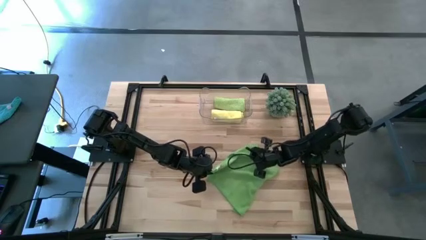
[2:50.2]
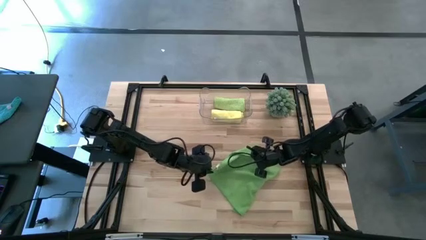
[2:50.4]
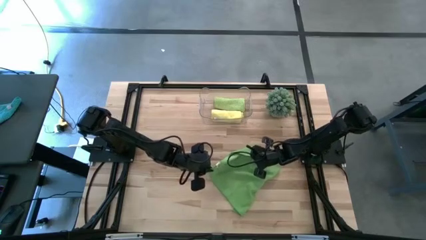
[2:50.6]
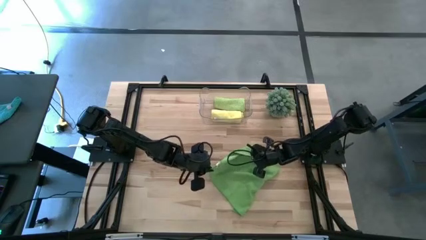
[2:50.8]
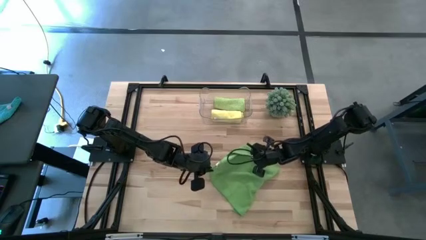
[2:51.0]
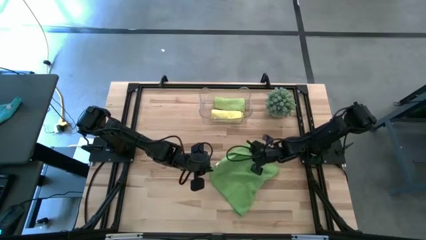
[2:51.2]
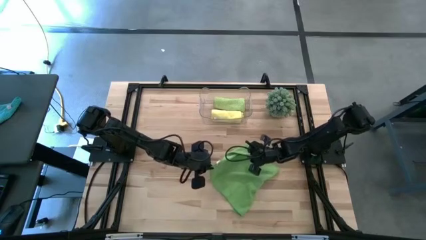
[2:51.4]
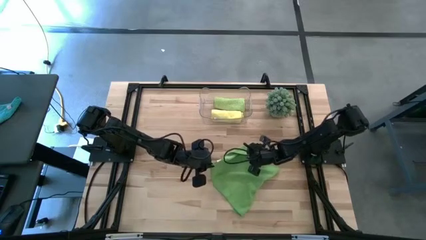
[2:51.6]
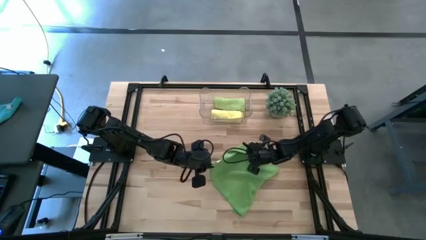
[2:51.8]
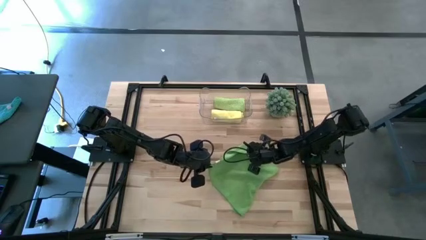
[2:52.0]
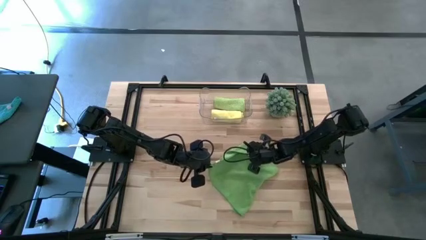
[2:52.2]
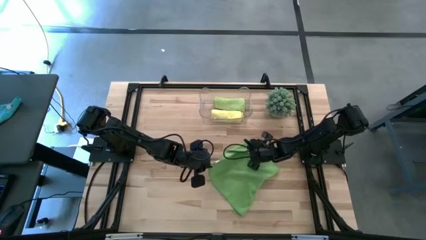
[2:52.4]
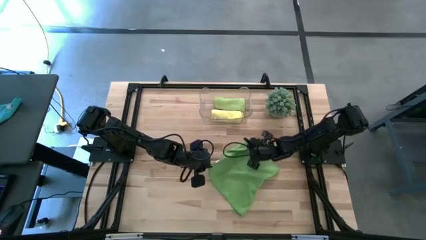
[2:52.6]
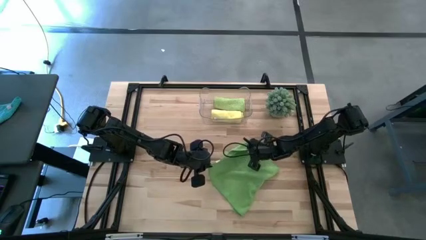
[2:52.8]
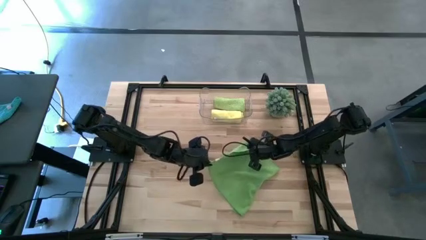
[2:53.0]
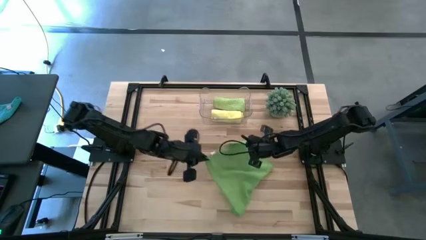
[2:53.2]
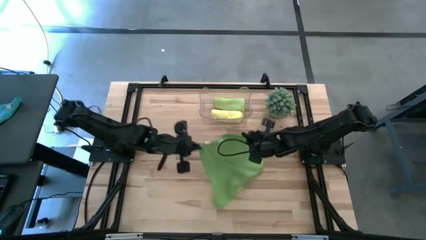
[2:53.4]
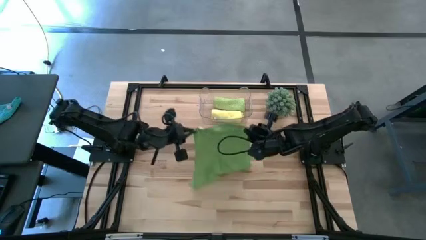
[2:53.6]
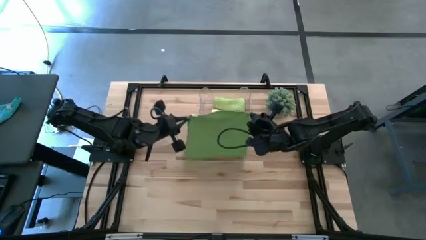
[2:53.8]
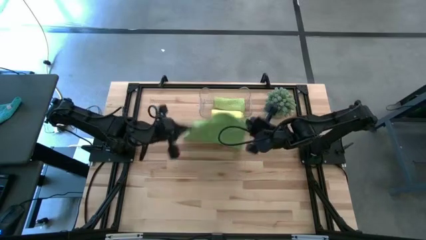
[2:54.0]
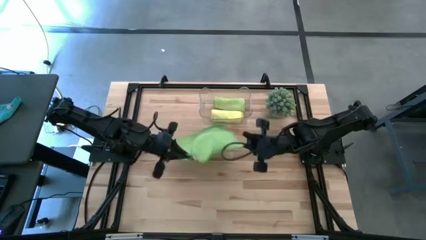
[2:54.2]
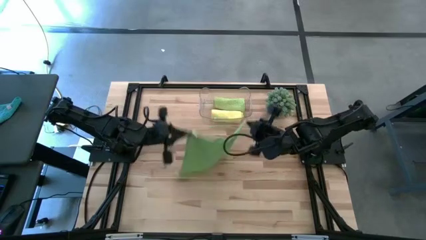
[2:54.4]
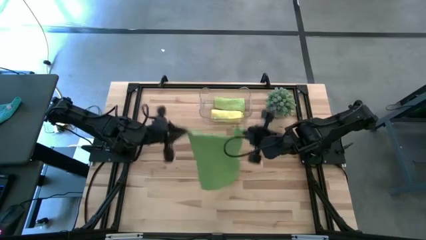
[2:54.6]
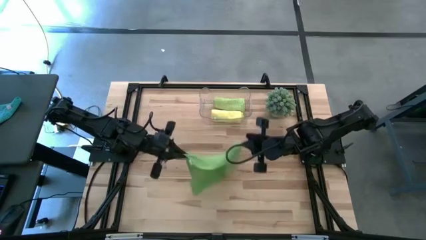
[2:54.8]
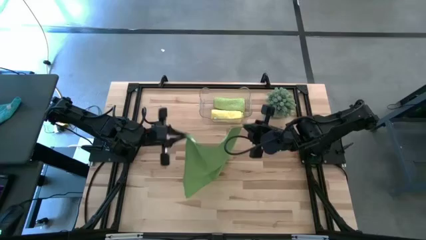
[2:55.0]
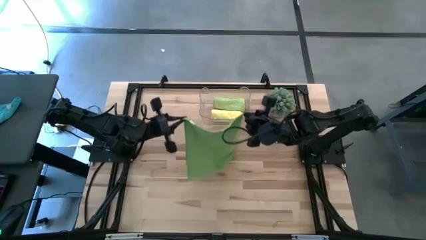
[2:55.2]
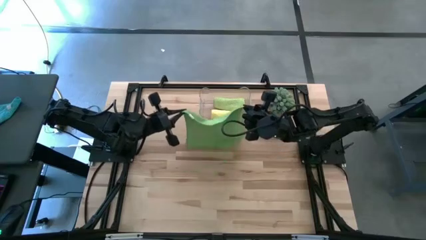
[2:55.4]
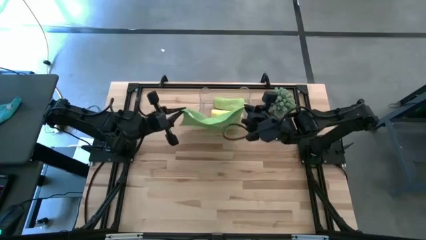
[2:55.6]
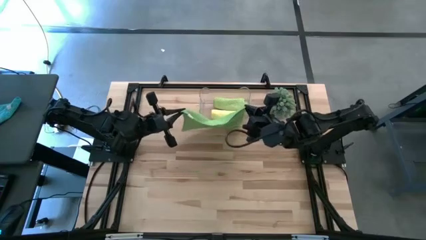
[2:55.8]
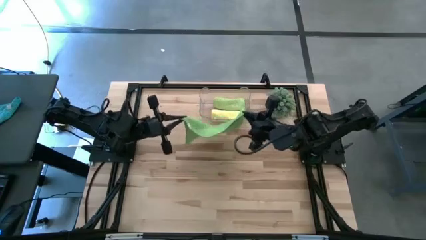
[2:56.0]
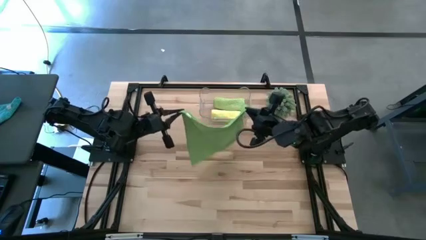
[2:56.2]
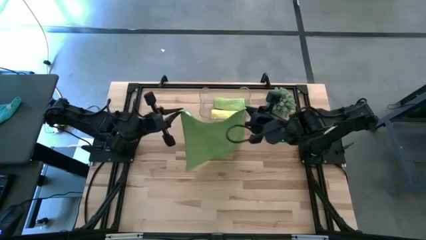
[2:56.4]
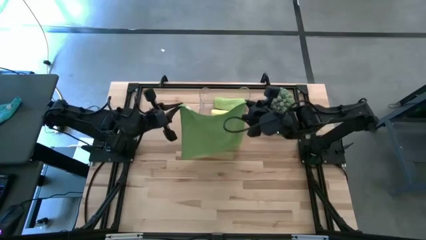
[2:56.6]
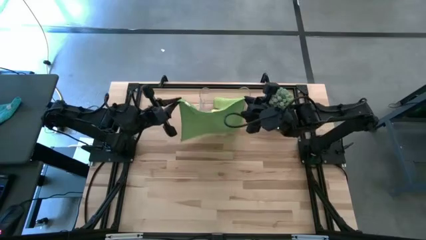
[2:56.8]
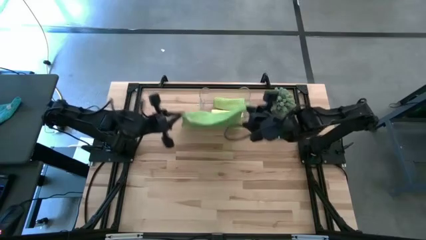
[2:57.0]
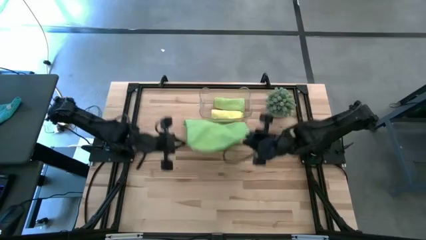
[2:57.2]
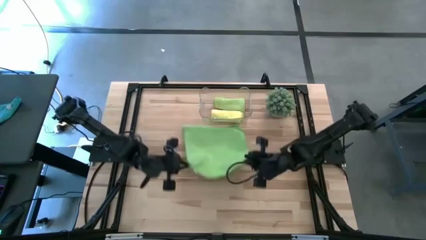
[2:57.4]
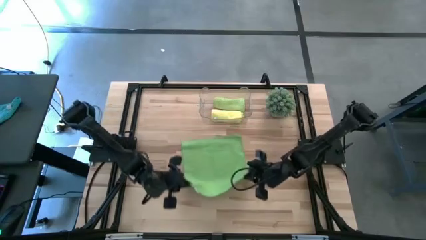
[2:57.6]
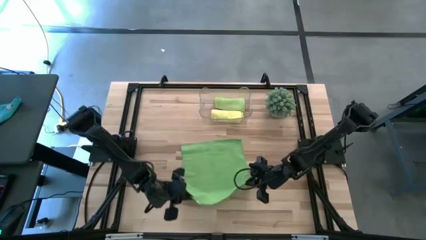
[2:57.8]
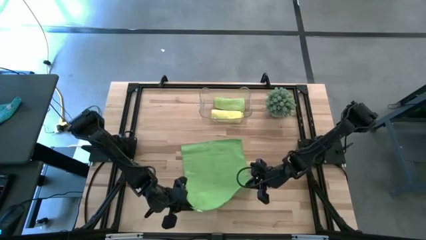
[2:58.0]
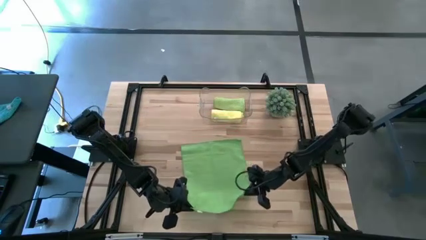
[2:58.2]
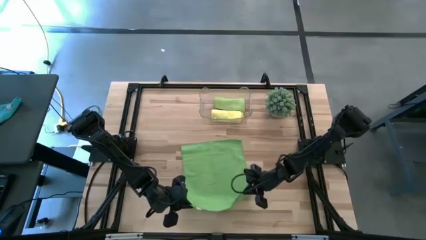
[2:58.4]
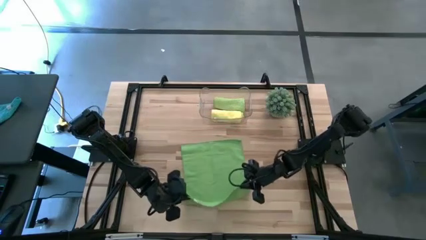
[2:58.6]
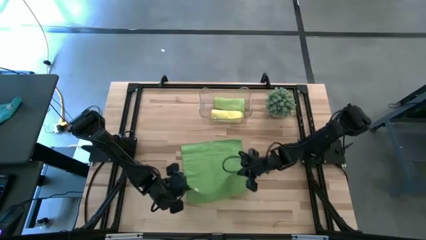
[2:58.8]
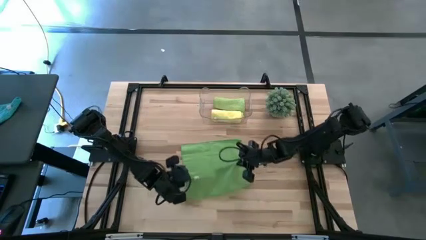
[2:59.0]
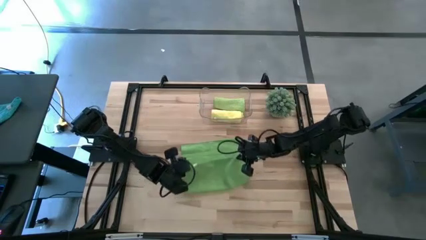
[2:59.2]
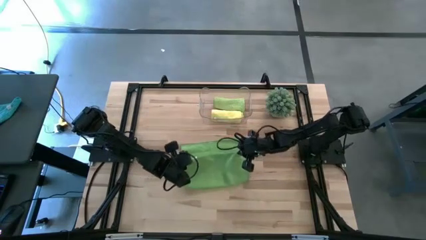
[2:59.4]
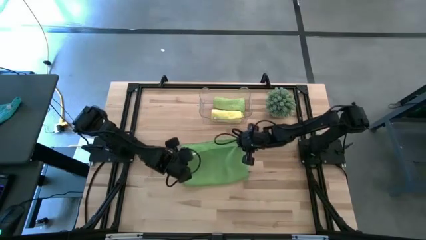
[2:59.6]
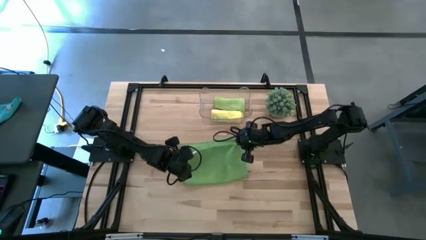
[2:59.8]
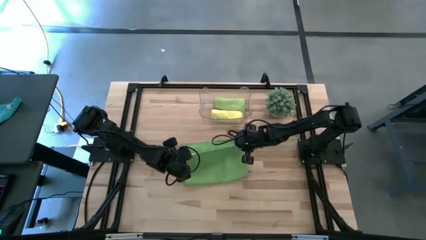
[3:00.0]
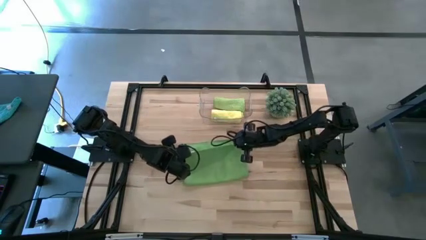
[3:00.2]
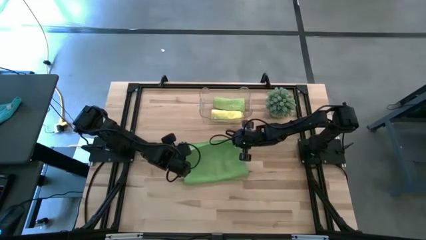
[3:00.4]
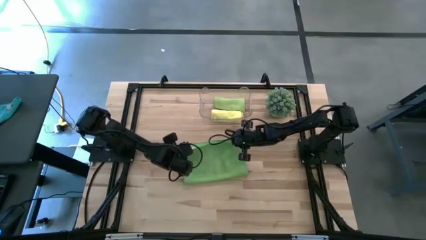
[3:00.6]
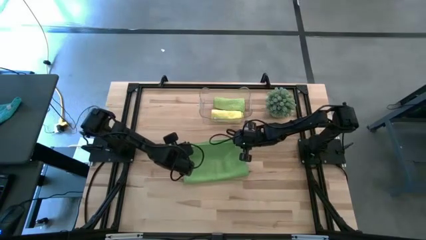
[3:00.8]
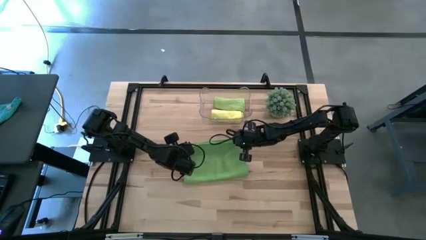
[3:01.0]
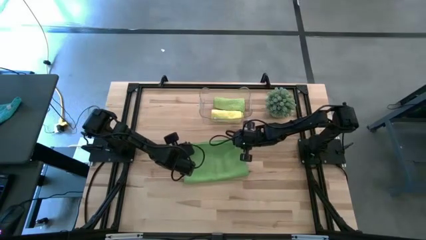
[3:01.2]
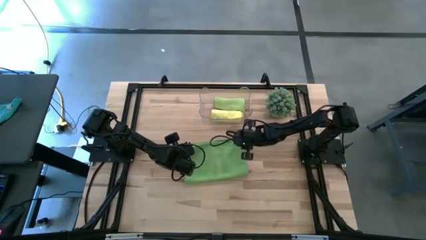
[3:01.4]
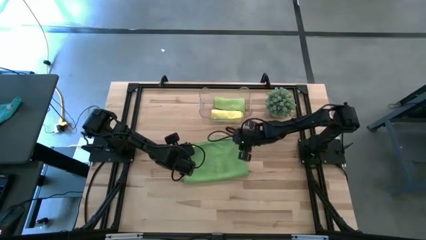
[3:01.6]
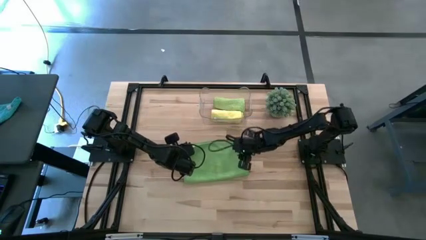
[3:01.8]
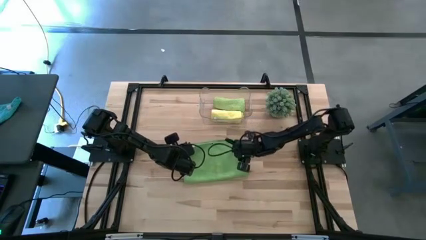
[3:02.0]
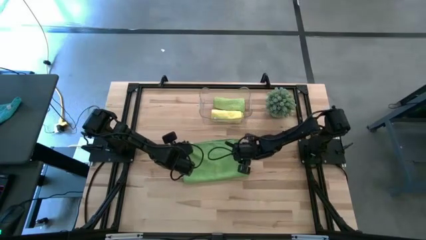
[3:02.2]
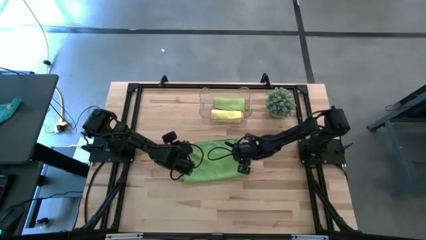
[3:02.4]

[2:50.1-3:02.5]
Task: Roll microfiber towels into tight, uniform cylinder then place into a basket
Fold the green microfiber towel
